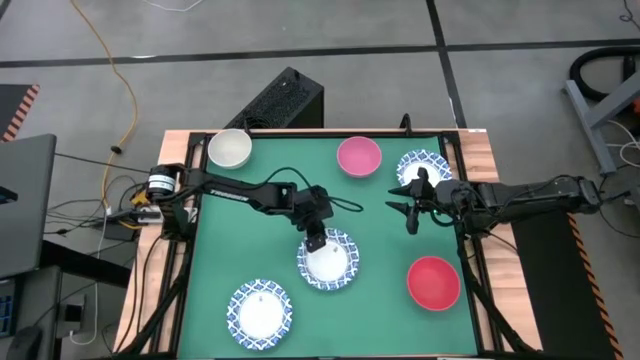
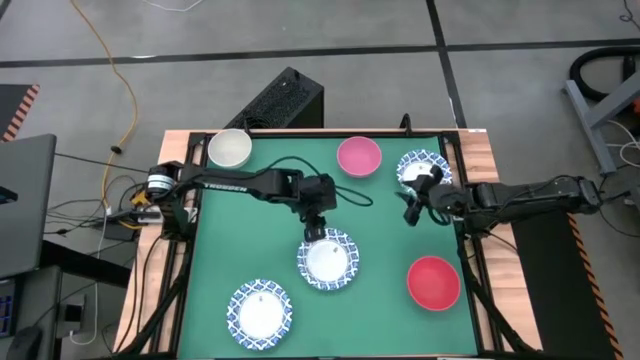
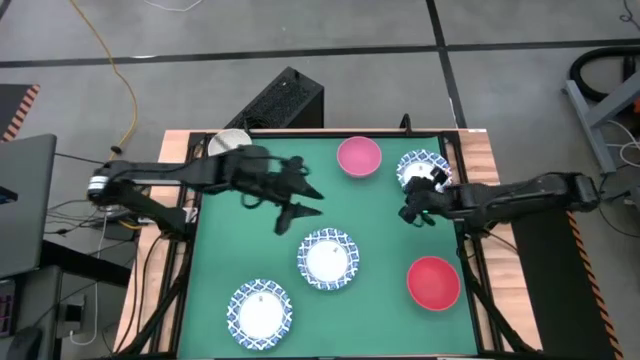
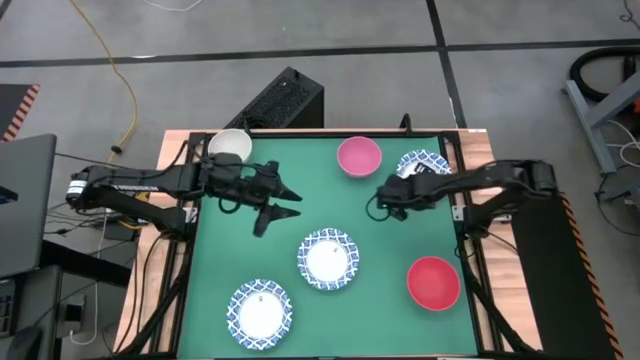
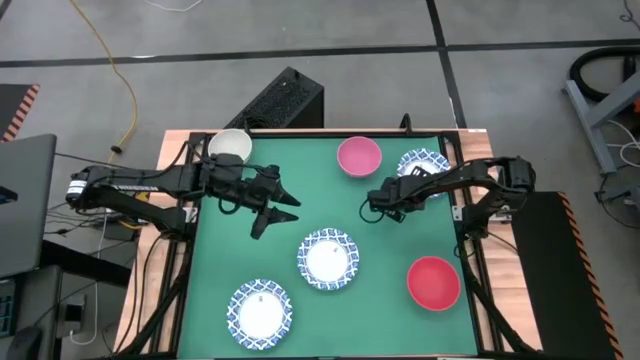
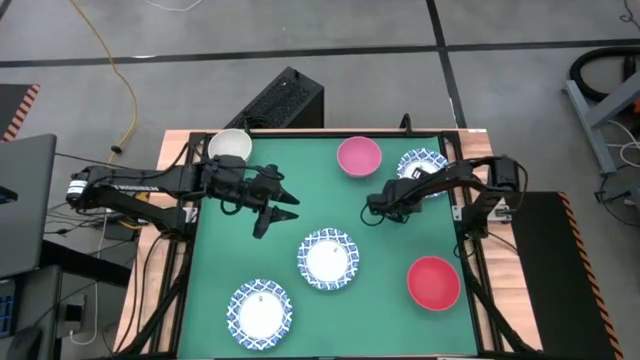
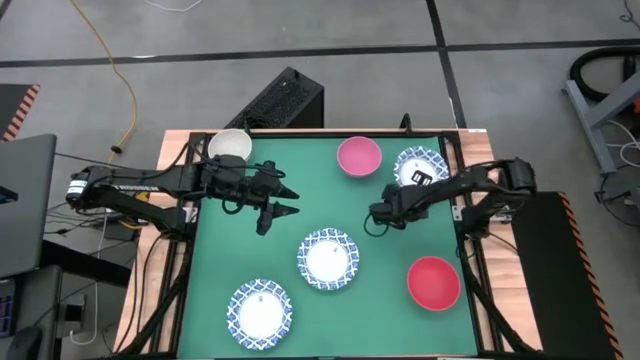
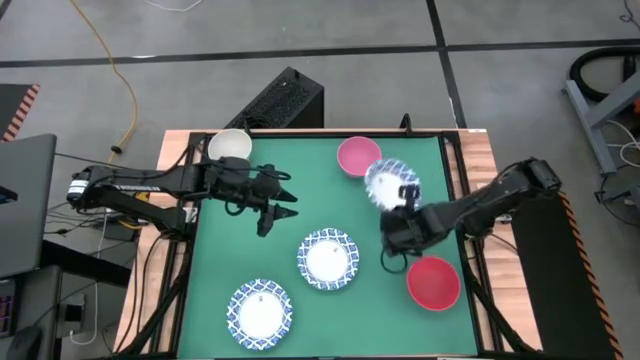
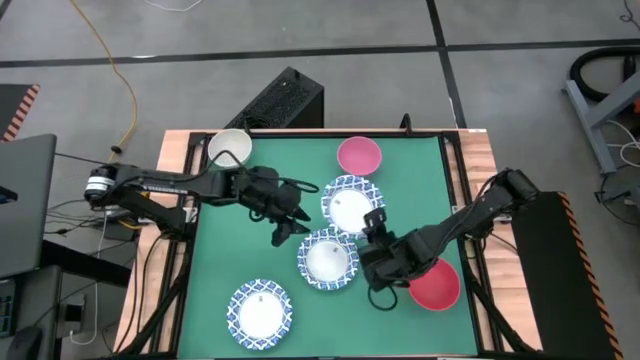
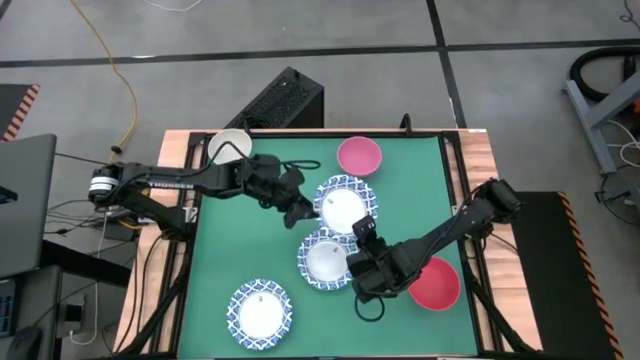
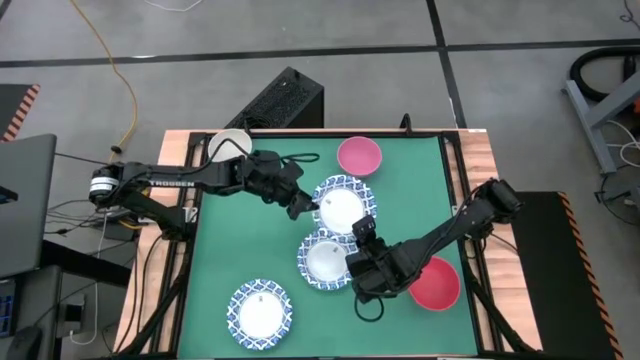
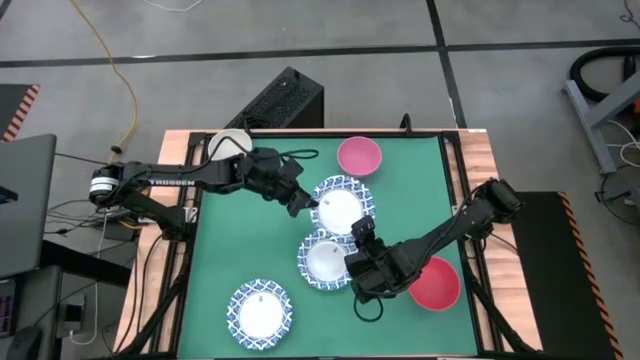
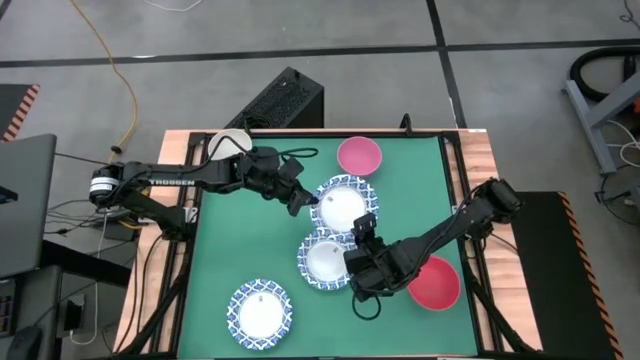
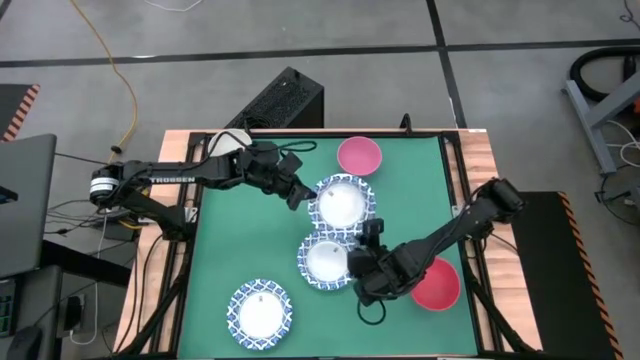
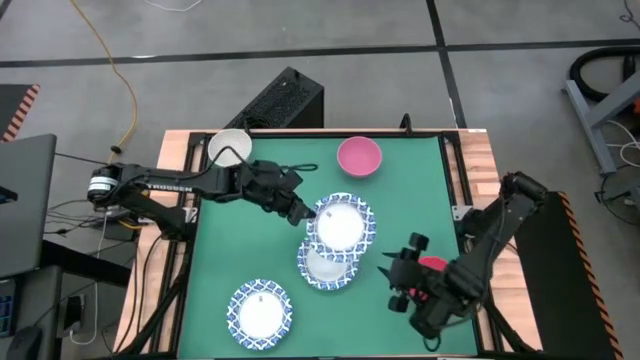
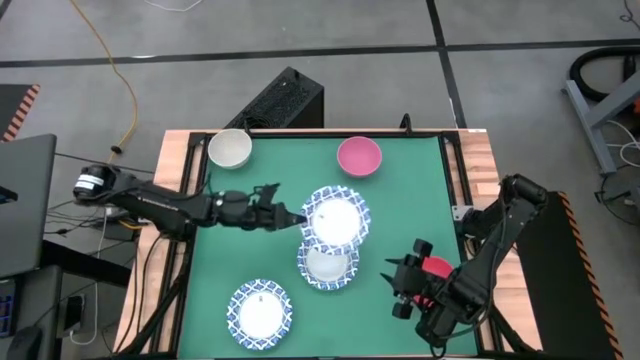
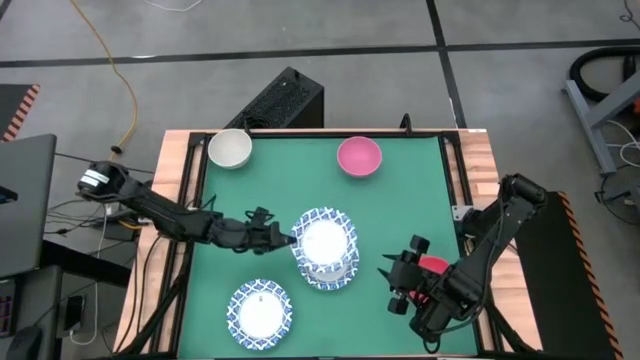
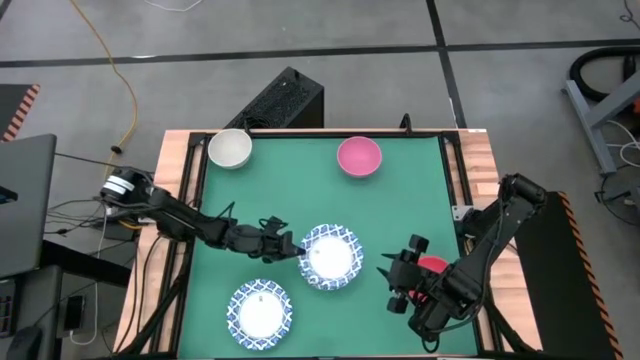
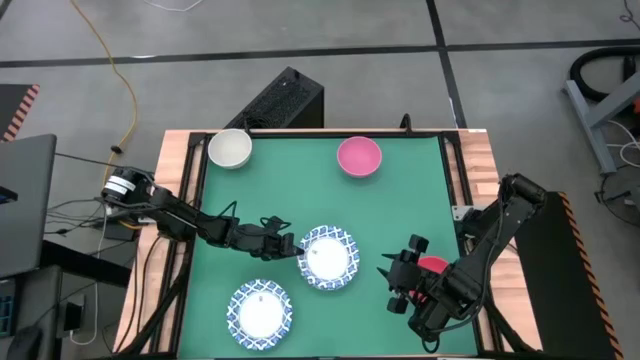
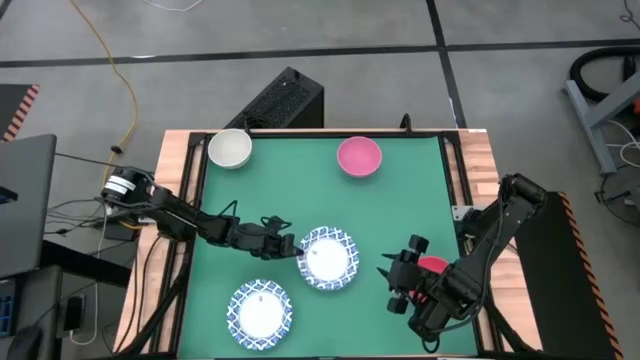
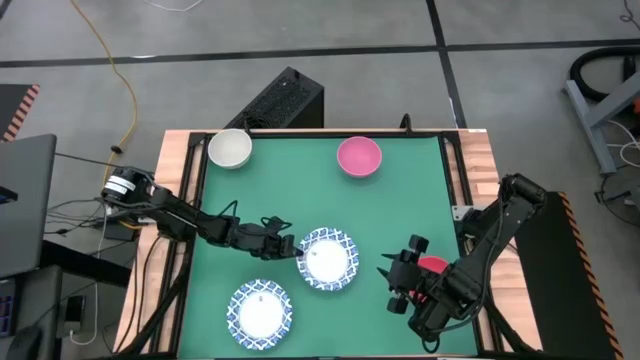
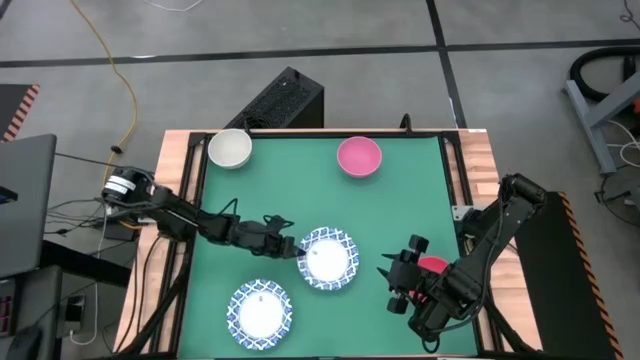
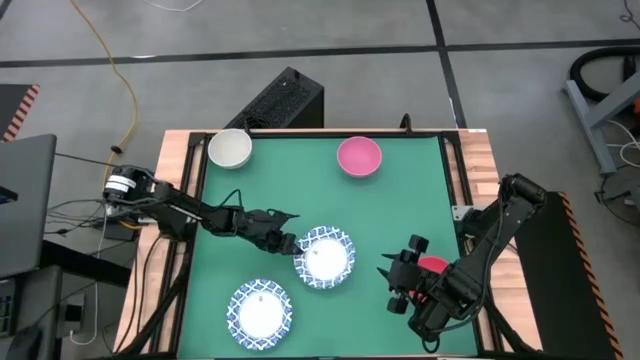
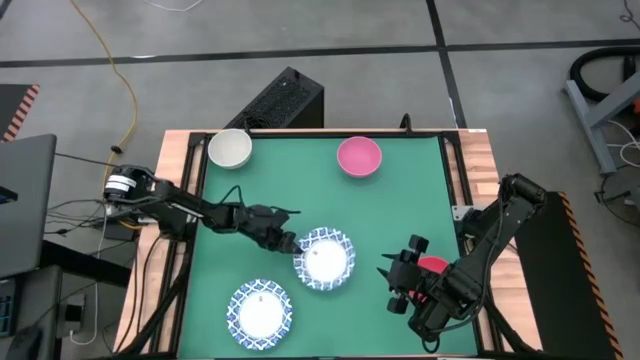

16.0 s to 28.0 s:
Stack the white with blue patterned bowl on top of the white with blue patterned bowl

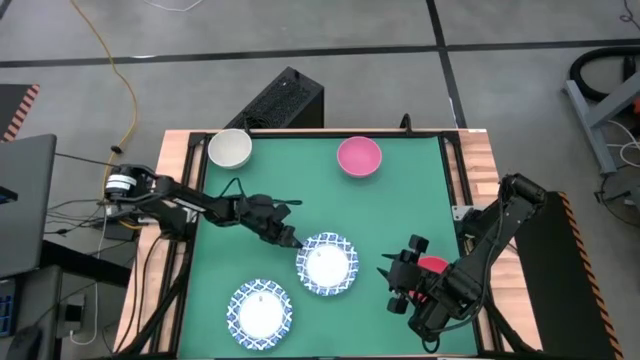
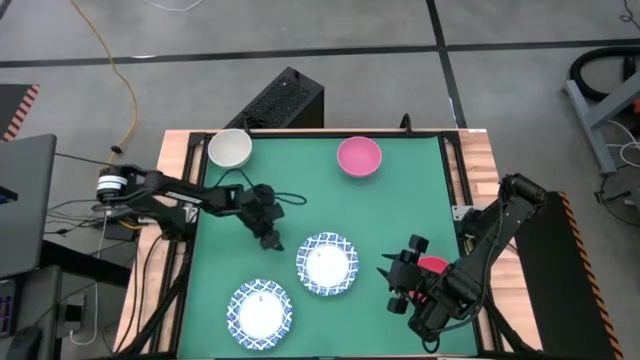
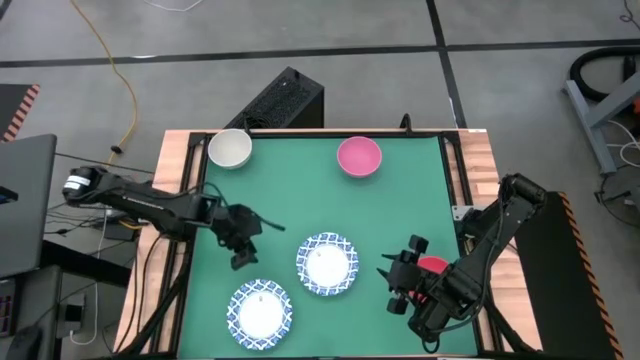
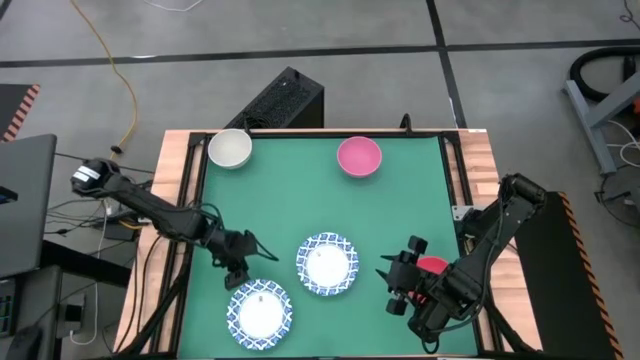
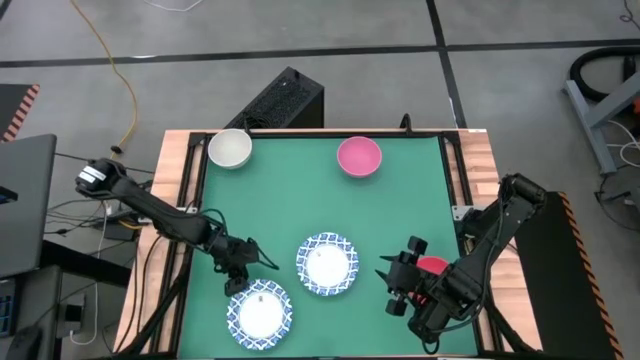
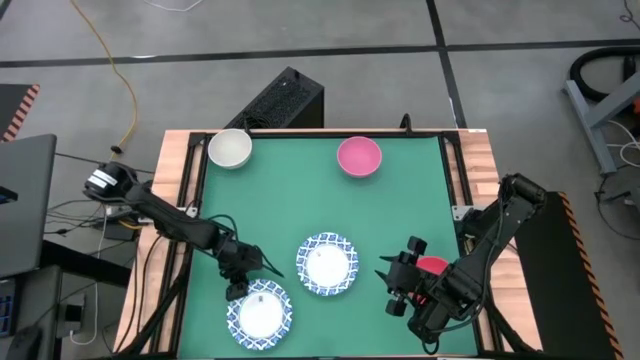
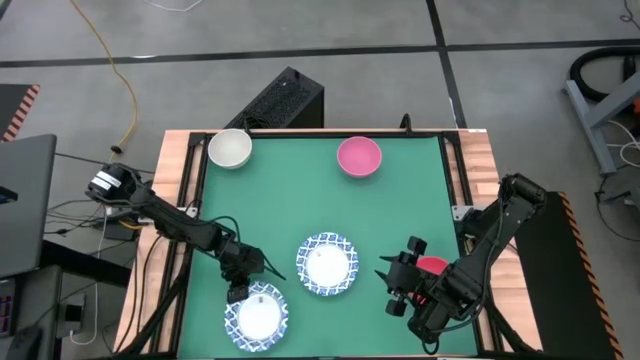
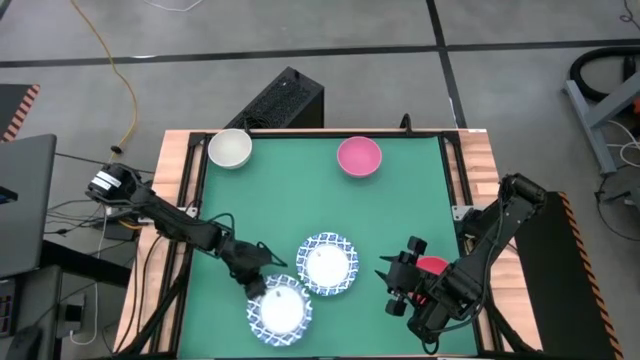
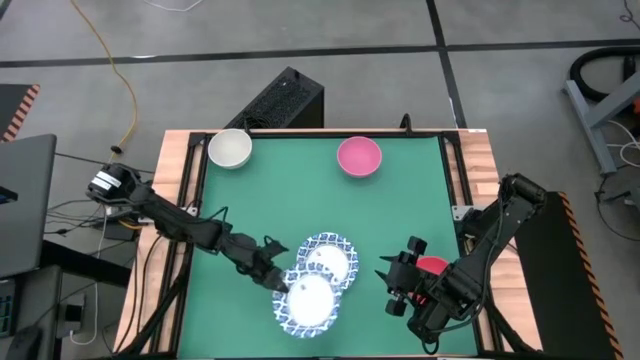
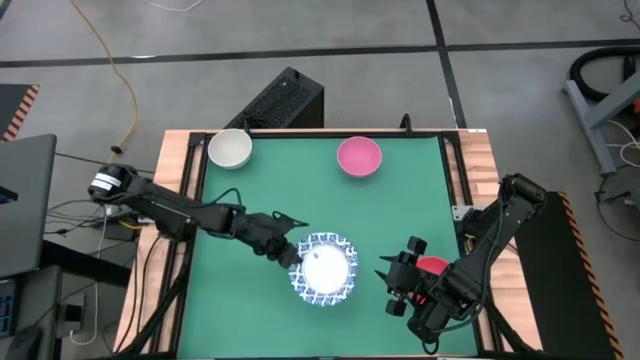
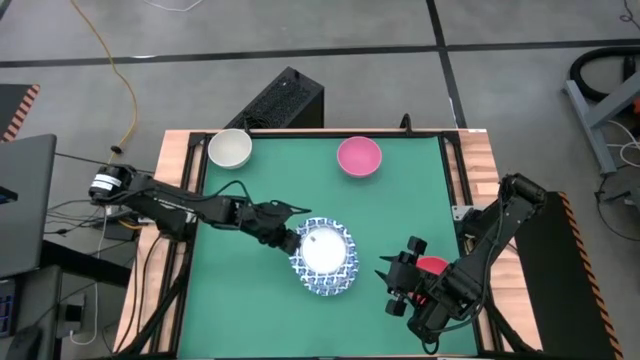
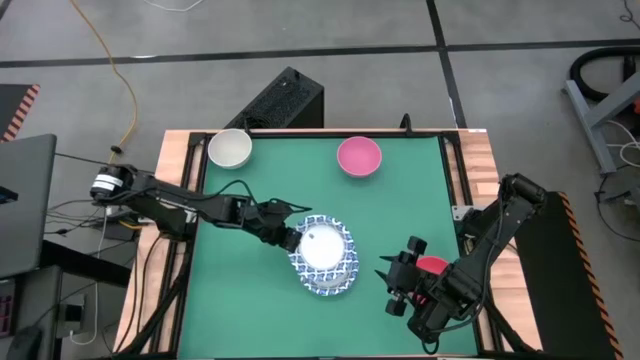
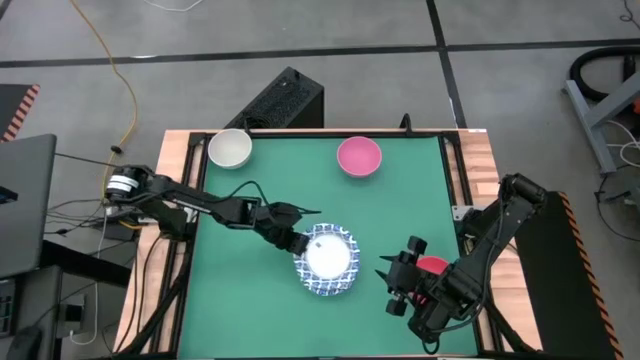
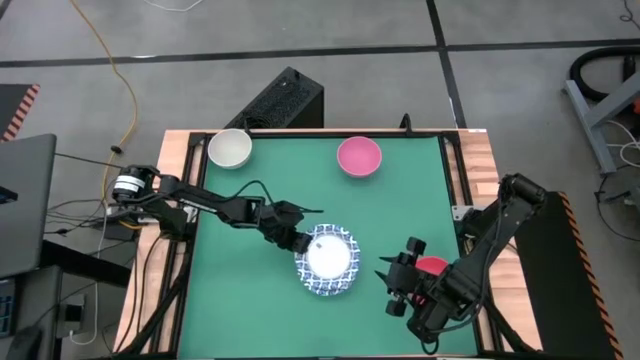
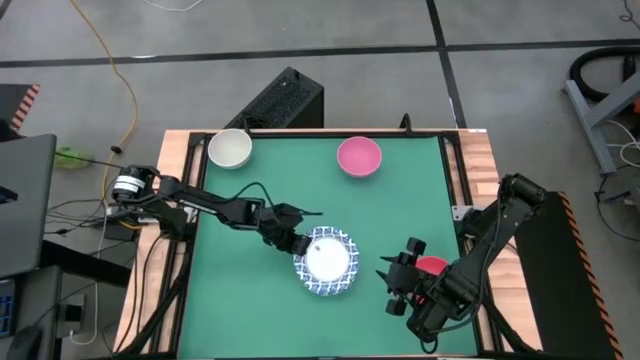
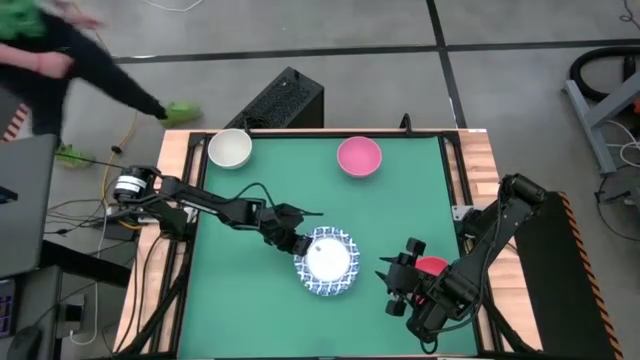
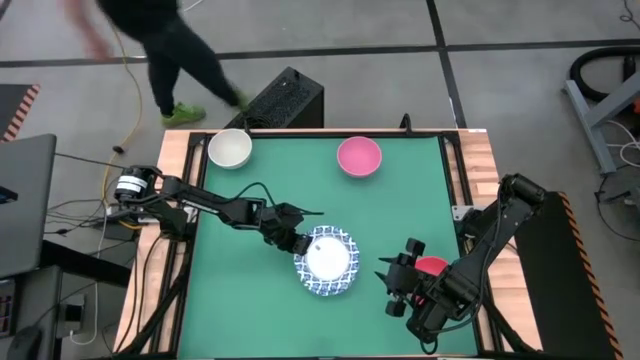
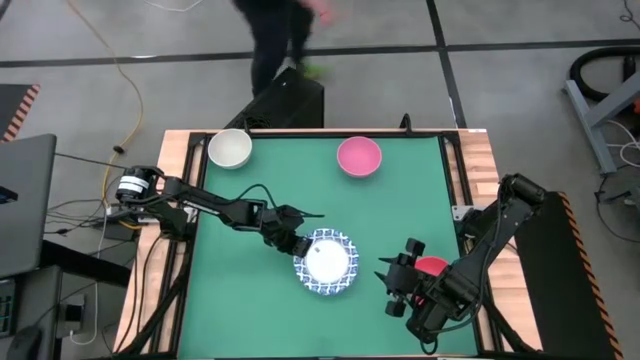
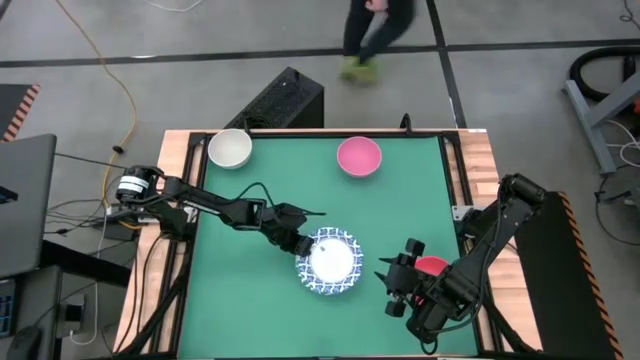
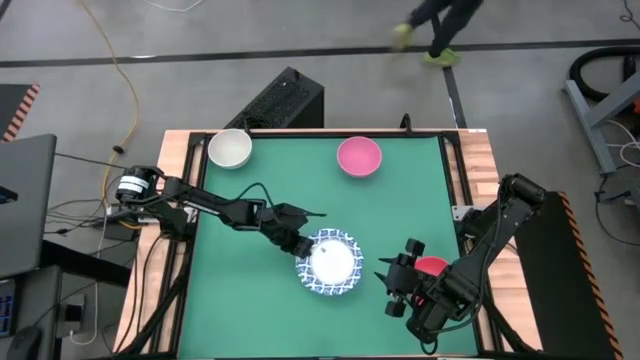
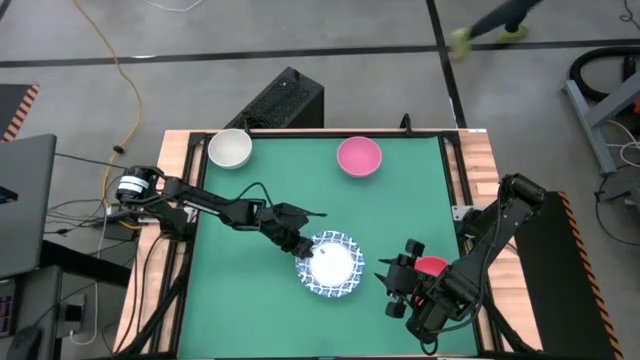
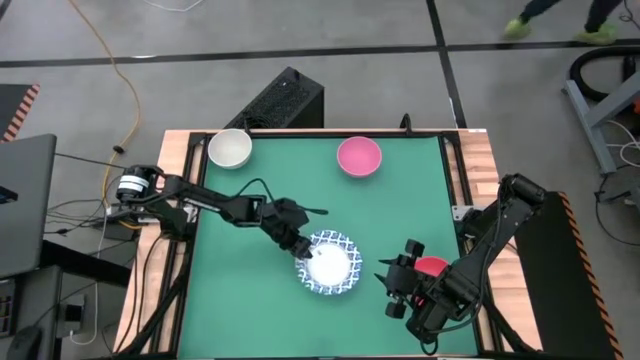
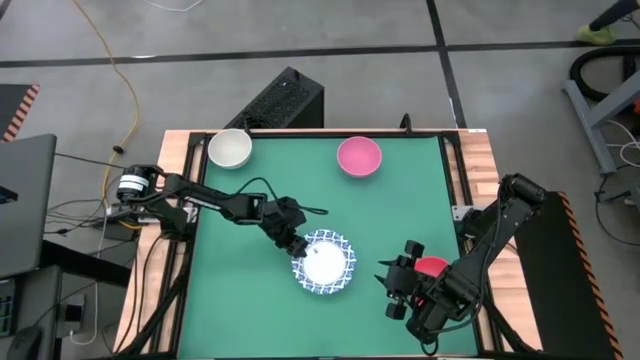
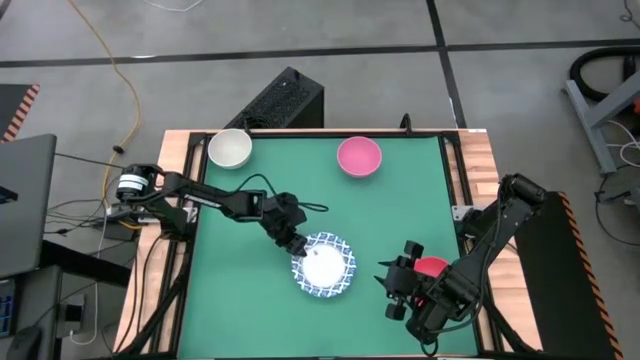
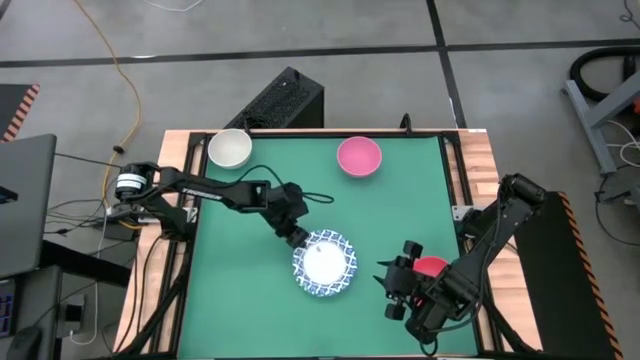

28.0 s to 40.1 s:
Stack the white with blue patterned bowl on top of the white with blue patterned bowl
